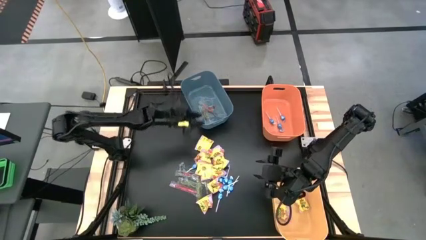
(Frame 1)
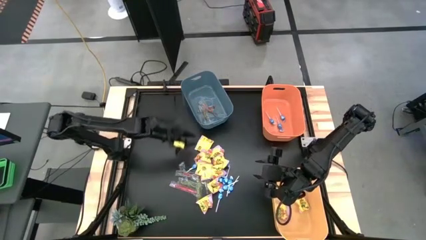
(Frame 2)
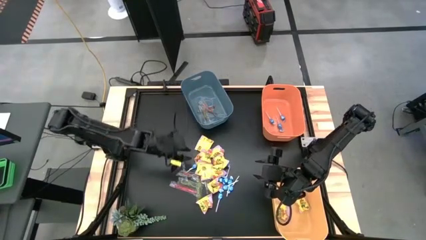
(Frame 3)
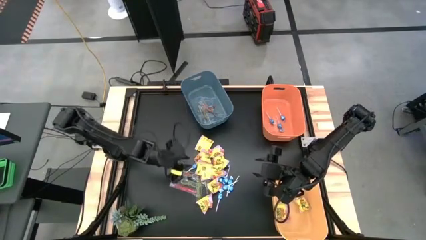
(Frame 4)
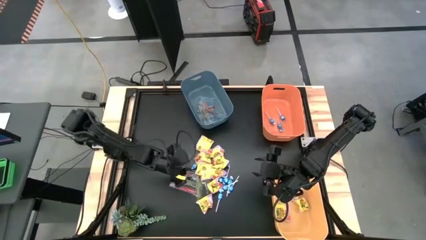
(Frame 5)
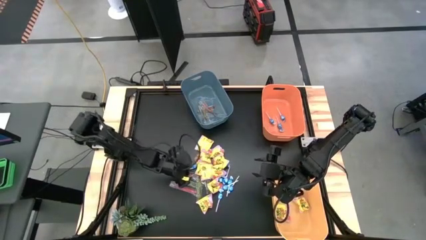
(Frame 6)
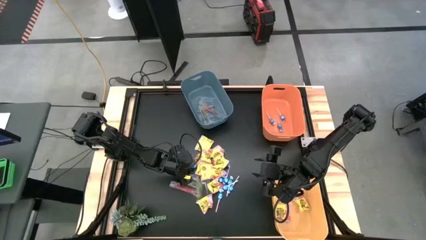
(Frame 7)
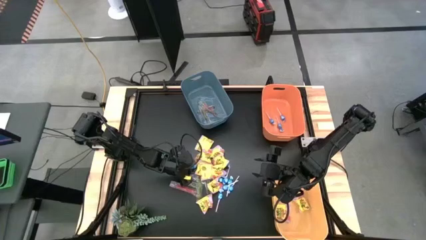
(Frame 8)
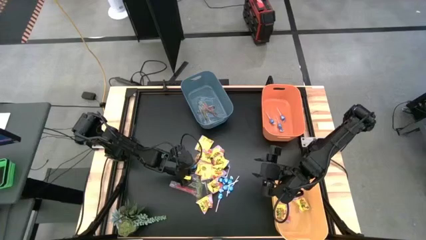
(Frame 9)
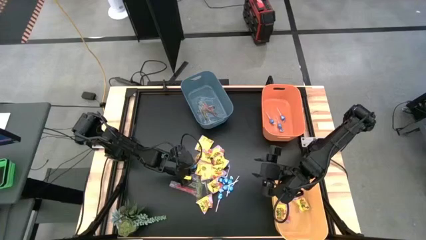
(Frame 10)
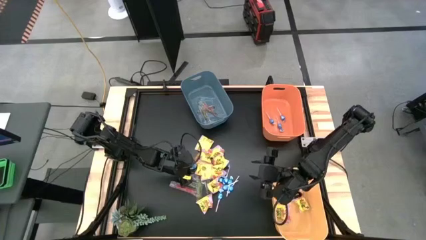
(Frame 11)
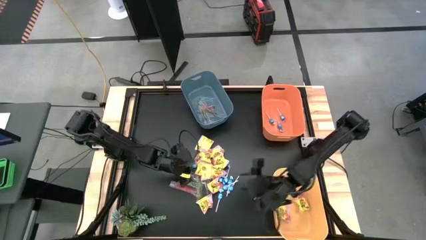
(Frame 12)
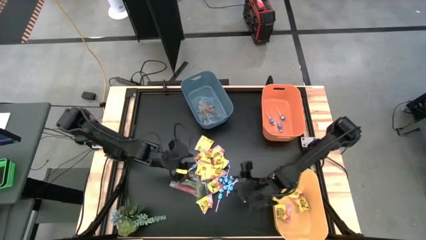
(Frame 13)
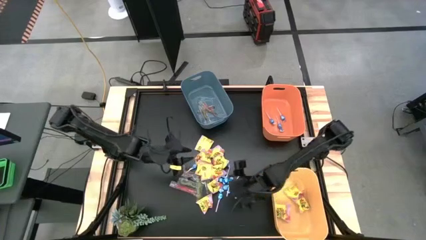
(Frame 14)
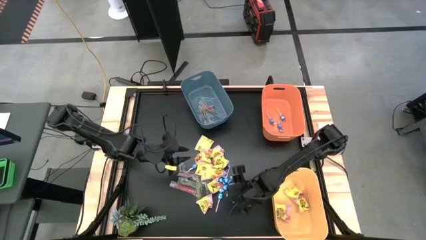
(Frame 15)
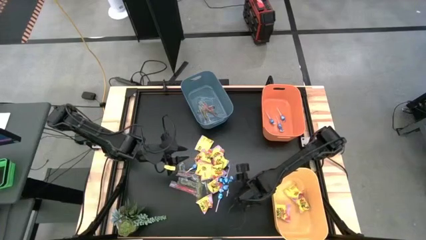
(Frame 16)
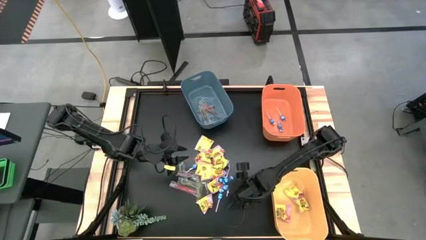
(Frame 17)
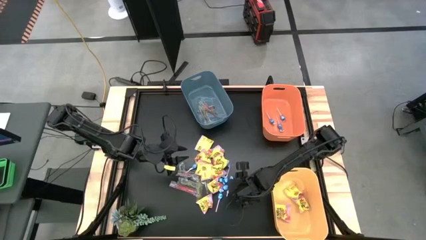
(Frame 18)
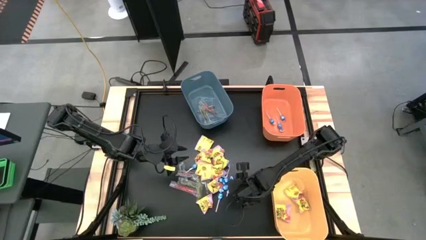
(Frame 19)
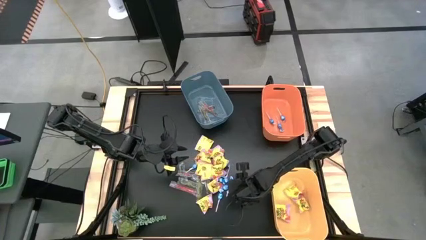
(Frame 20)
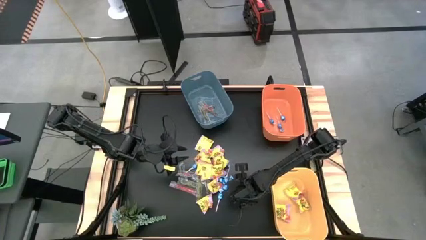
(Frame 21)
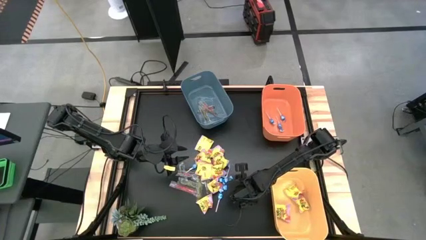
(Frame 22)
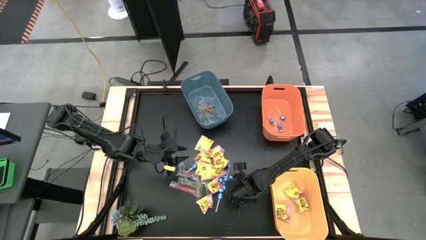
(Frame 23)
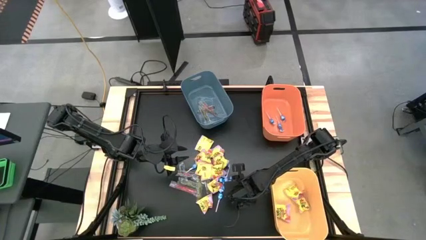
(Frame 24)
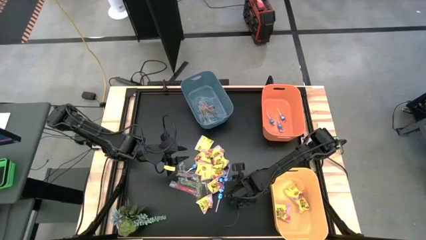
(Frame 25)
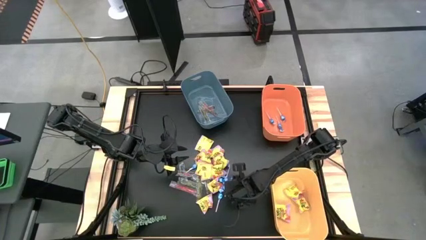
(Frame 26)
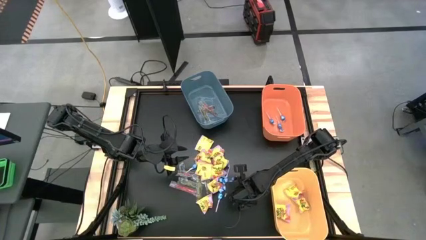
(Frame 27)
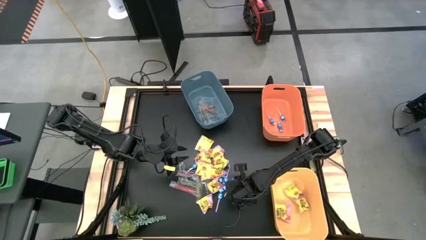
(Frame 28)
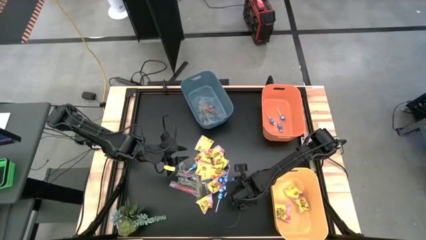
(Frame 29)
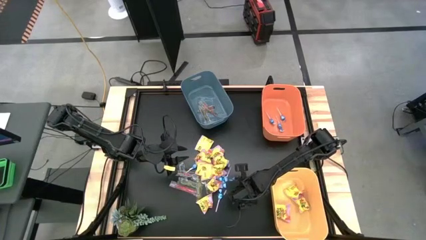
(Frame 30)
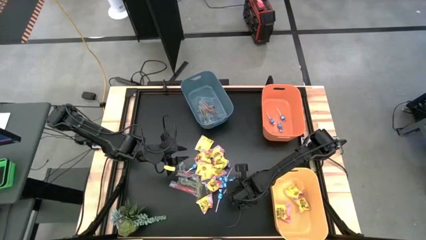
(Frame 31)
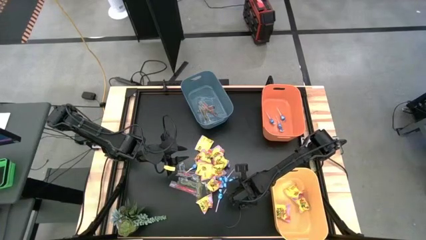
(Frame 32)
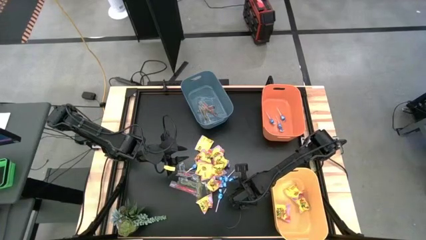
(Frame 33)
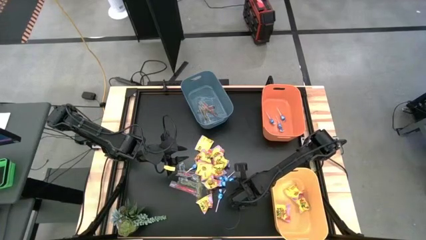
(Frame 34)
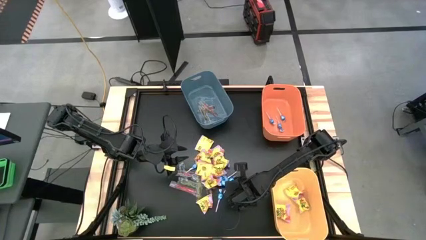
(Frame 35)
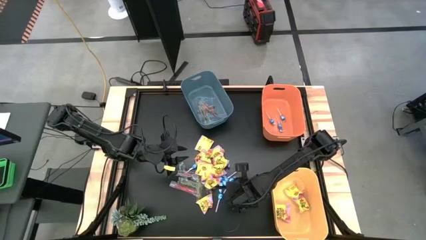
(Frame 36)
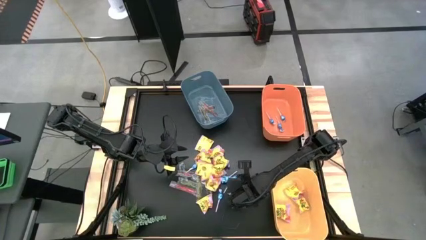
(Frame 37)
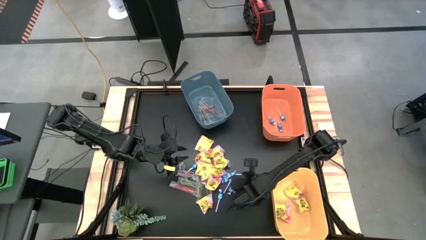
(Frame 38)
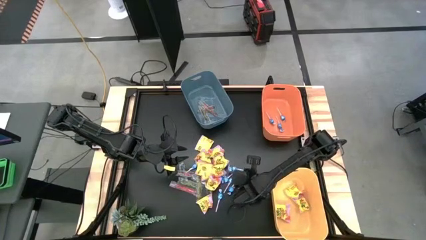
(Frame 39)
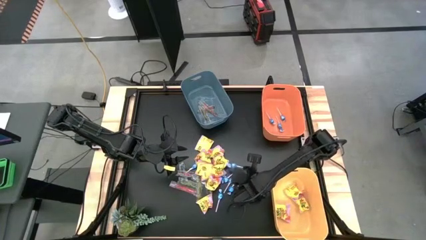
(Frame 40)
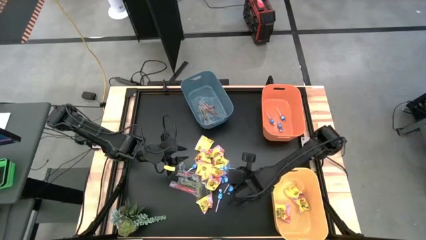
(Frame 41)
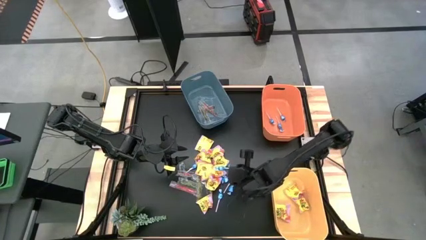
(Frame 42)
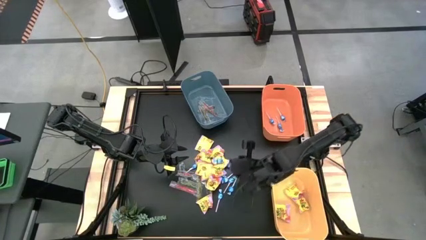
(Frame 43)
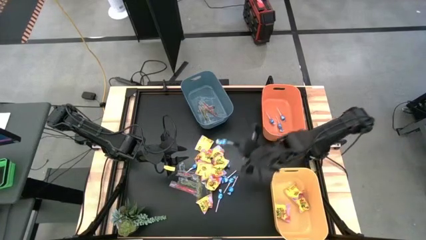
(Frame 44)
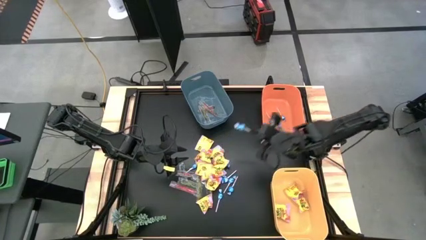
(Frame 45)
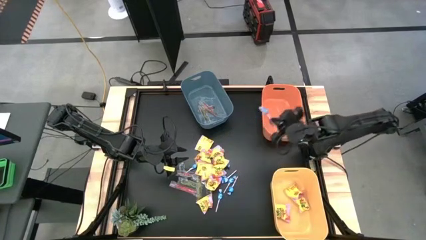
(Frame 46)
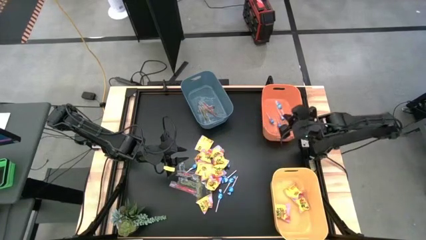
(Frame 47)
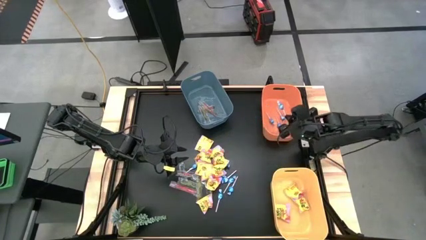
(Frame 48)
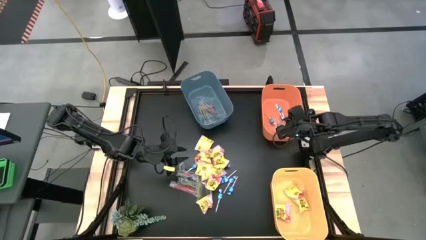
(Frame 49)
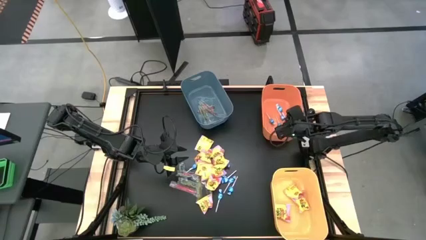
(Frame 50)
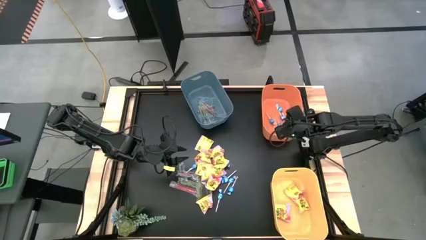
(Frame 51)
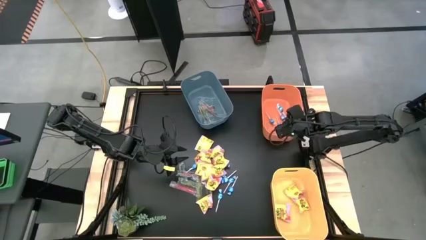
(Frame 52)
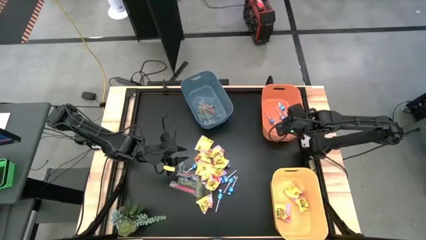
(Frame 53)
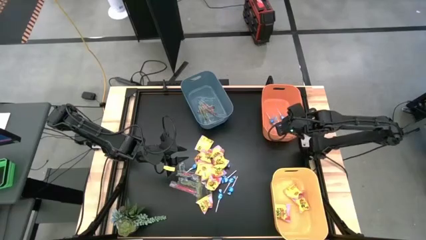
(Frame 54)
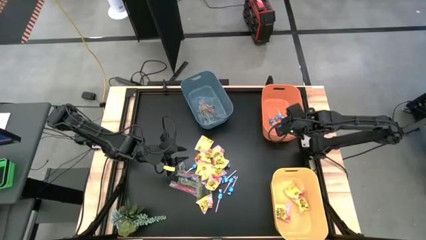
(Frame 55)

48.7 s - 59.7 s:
Task: Sort candy
Put the blue candy into the orange bin

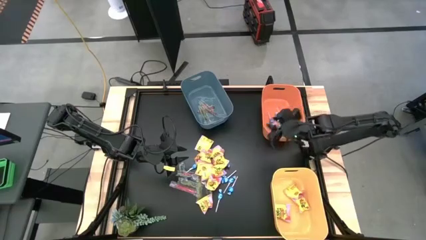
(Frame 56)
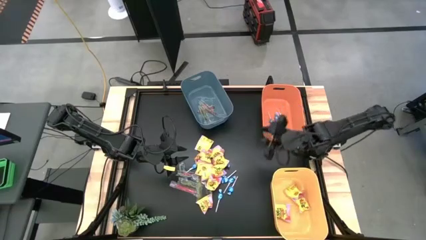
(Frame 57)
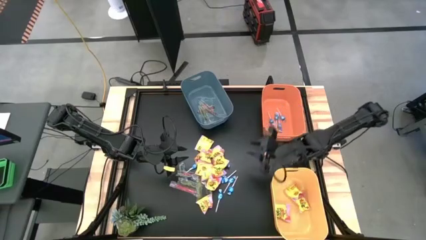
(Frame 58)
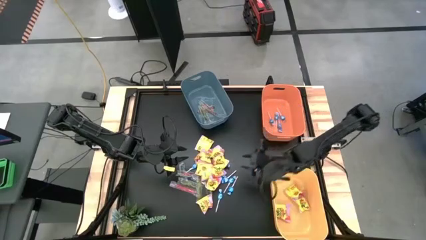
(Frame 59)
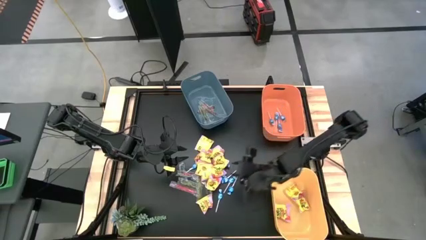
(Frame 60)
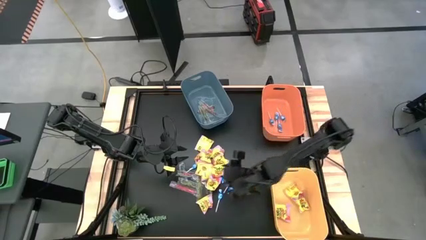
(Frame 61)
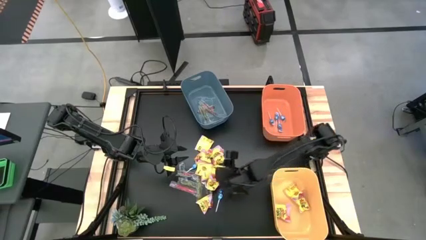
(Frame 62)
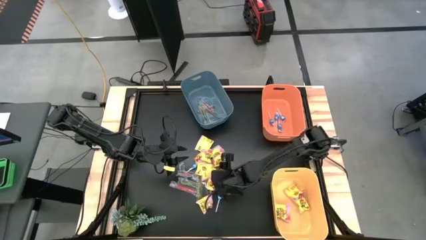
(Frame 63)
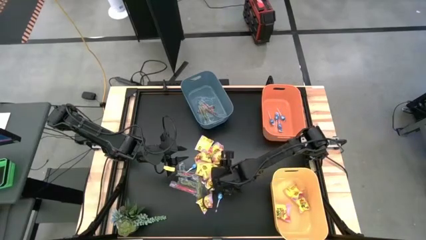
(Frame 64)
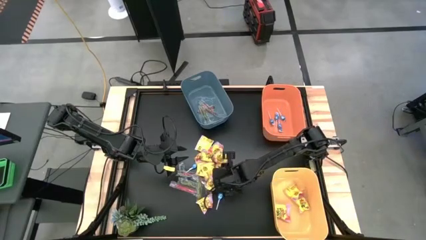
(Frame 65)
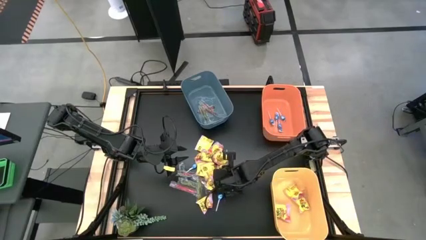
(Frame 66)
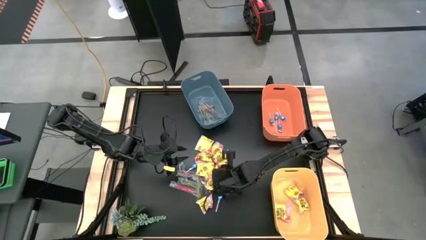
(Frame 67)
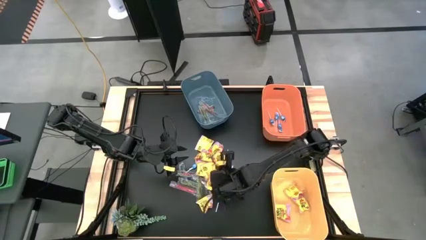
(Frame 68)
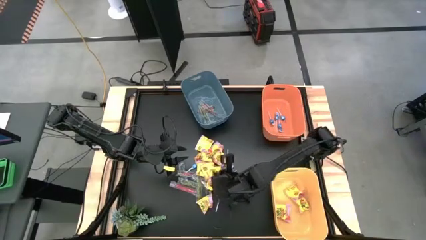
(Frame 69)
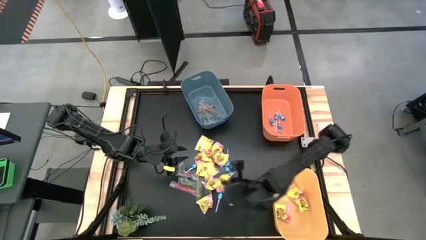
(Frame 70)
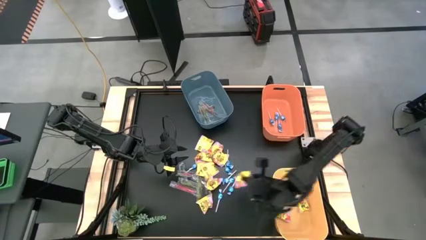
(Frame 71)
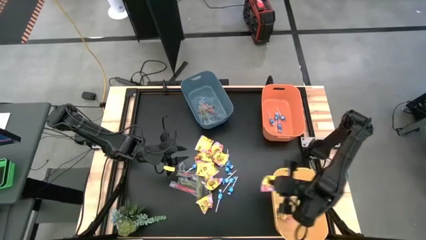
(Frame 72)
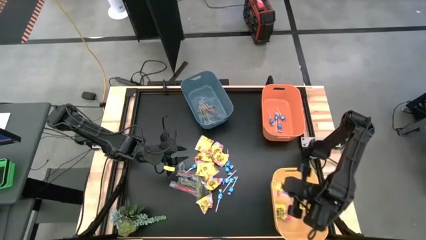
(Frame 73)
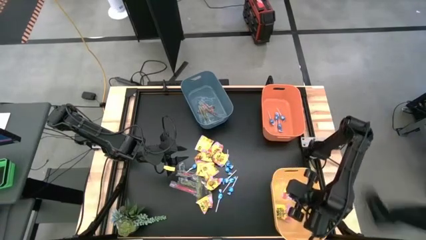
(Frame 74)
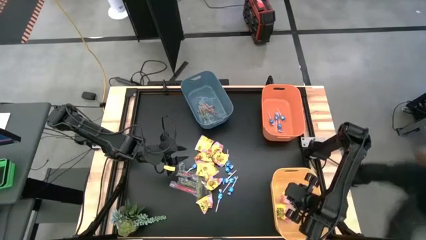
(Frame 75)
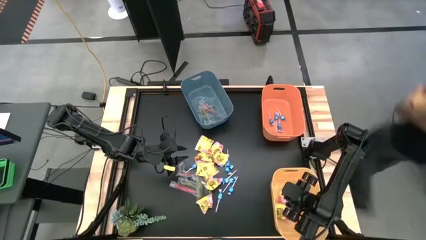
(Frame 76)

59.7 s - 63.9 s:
Put the yellow candy into the yellow bin
